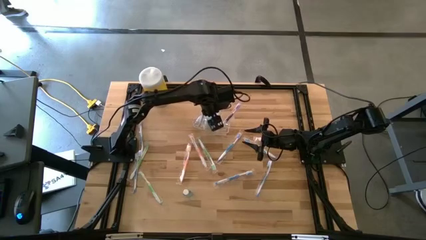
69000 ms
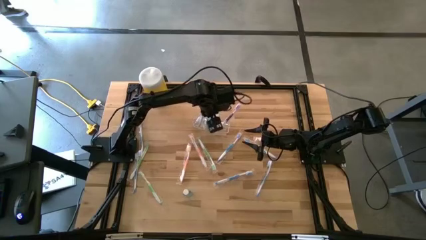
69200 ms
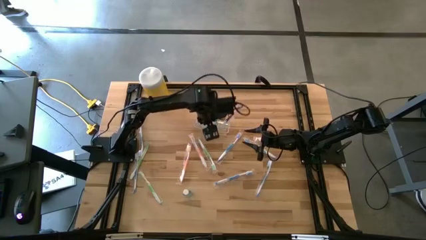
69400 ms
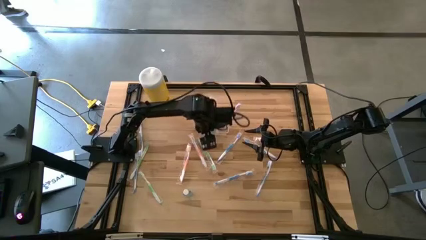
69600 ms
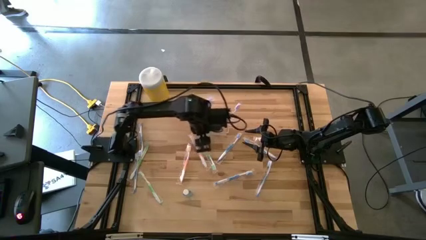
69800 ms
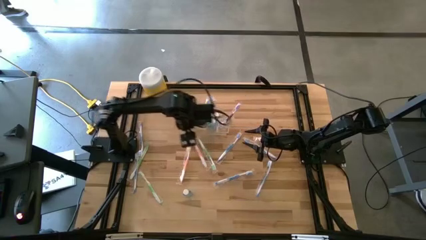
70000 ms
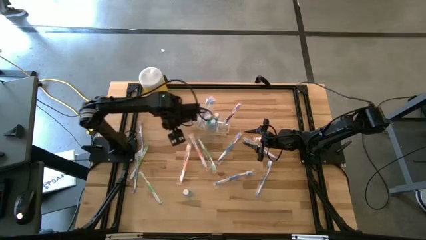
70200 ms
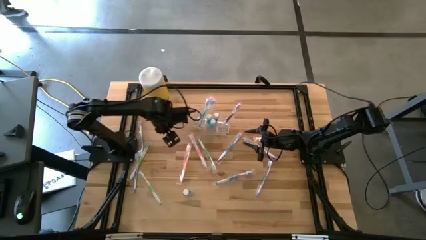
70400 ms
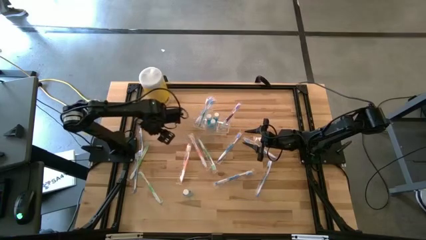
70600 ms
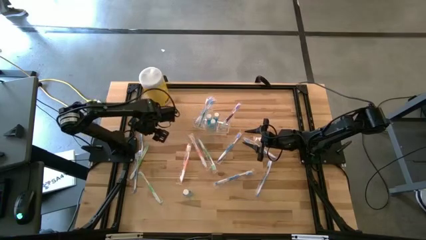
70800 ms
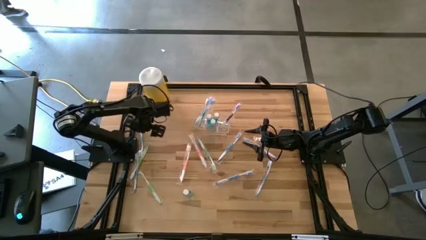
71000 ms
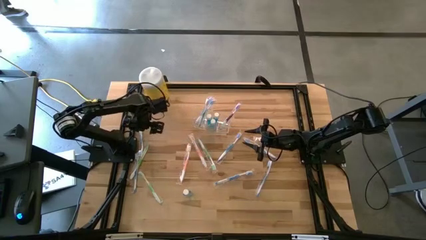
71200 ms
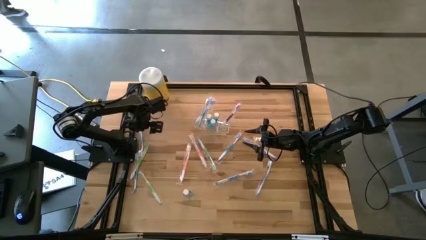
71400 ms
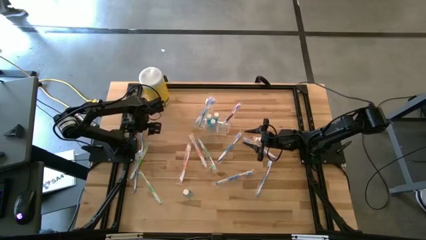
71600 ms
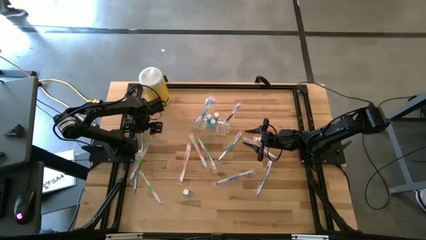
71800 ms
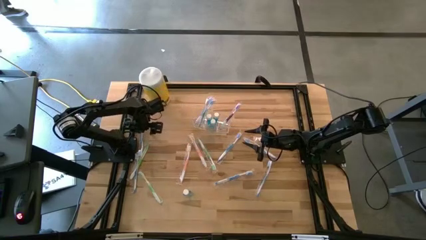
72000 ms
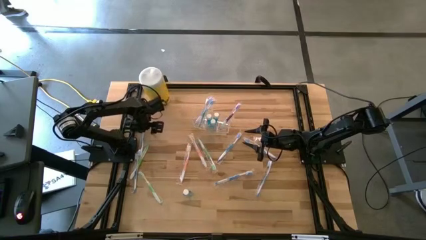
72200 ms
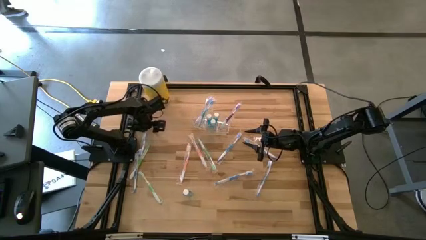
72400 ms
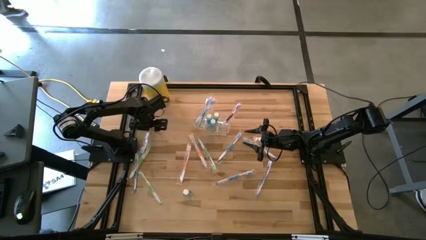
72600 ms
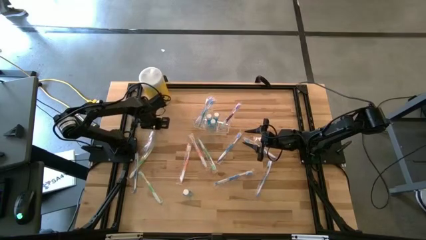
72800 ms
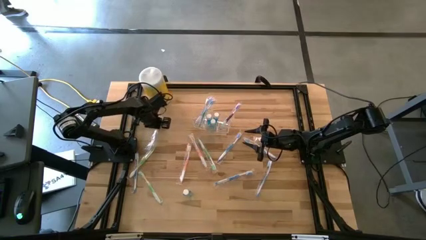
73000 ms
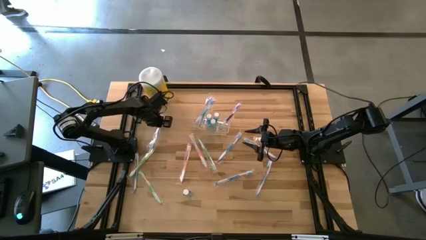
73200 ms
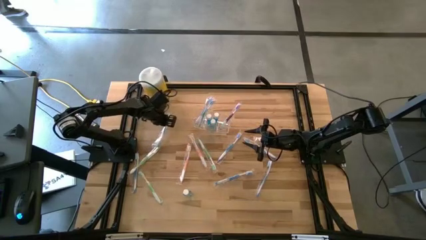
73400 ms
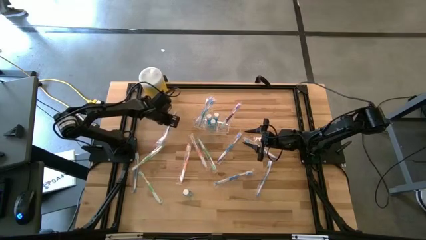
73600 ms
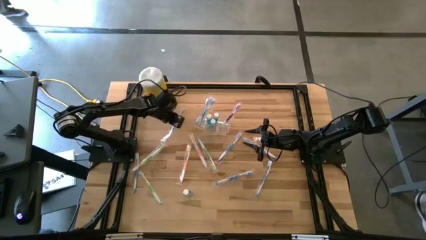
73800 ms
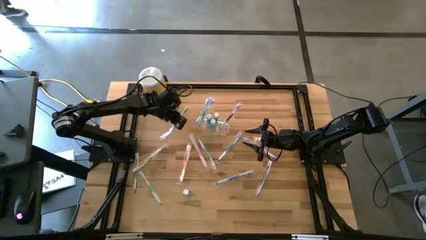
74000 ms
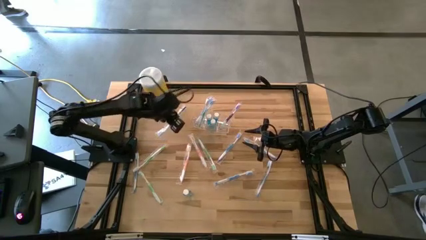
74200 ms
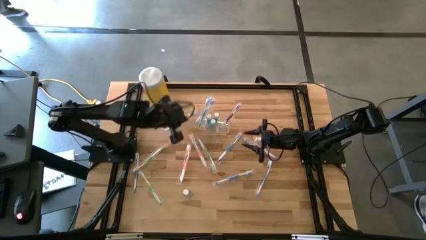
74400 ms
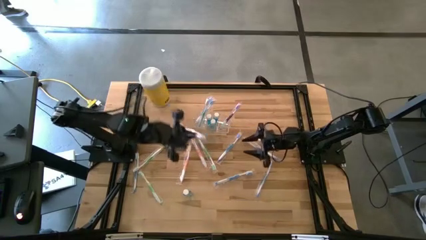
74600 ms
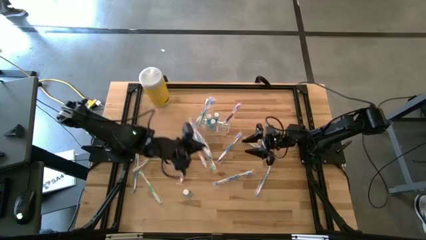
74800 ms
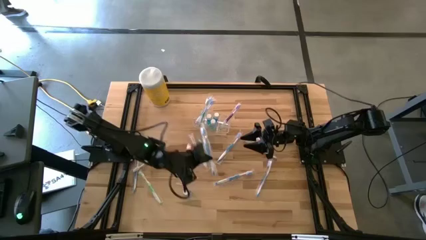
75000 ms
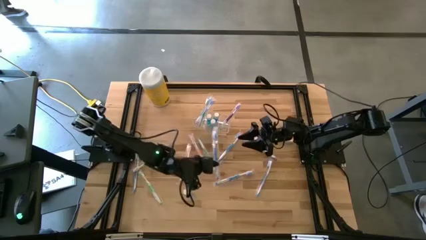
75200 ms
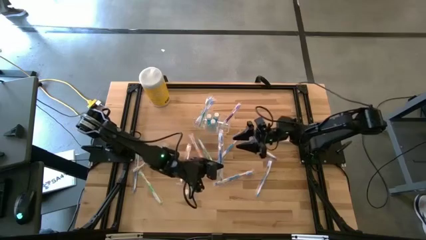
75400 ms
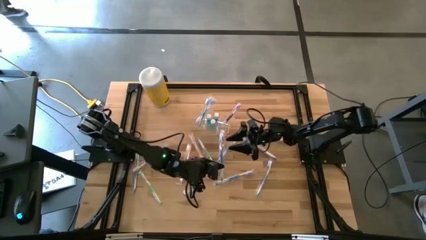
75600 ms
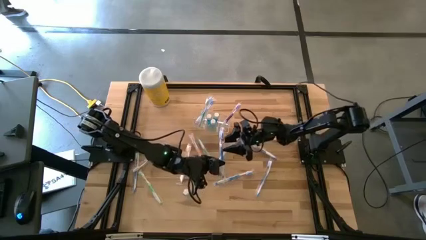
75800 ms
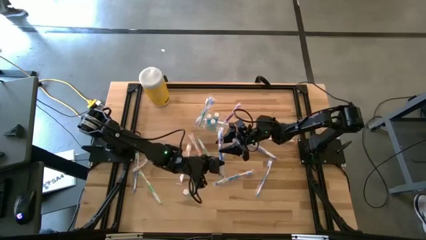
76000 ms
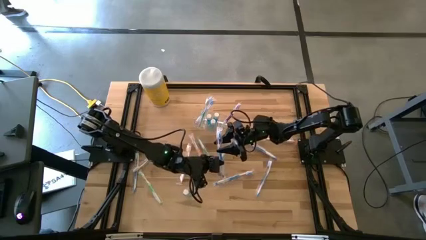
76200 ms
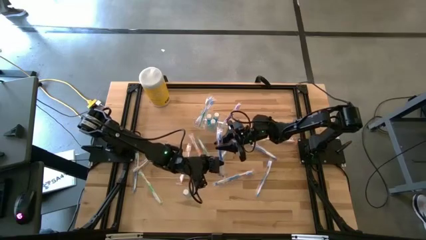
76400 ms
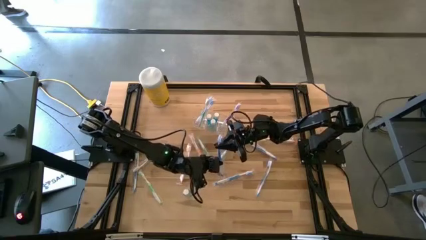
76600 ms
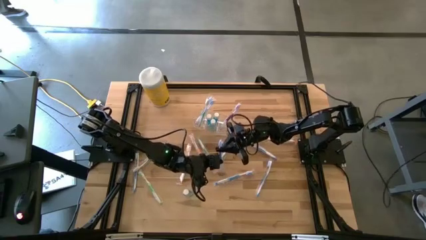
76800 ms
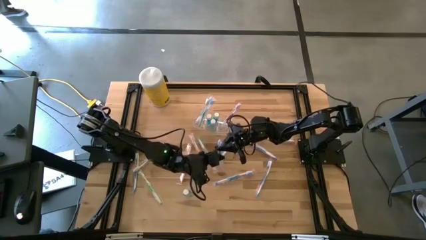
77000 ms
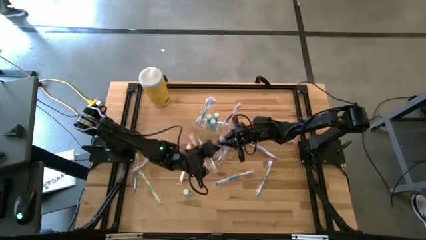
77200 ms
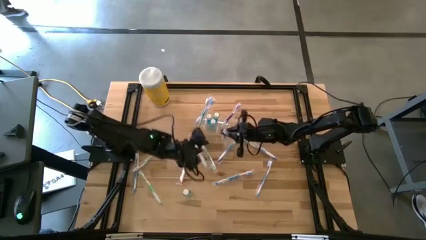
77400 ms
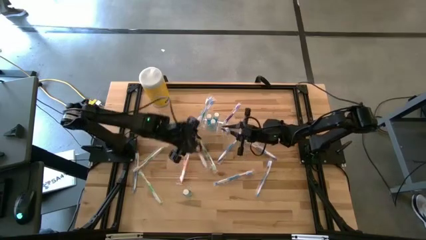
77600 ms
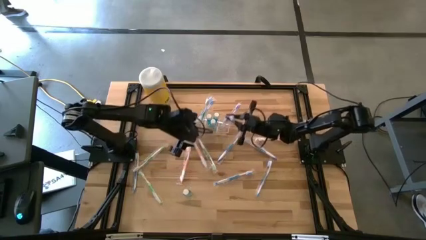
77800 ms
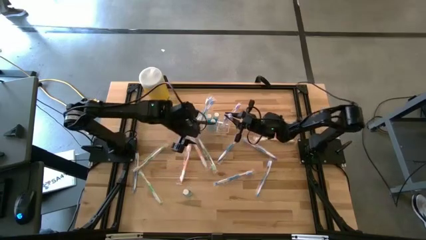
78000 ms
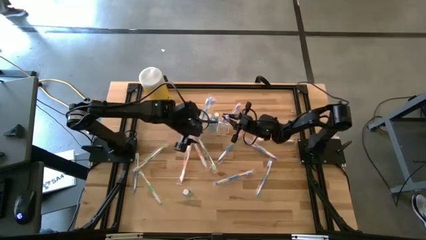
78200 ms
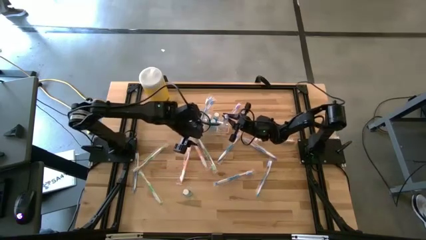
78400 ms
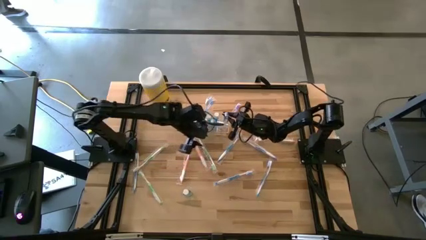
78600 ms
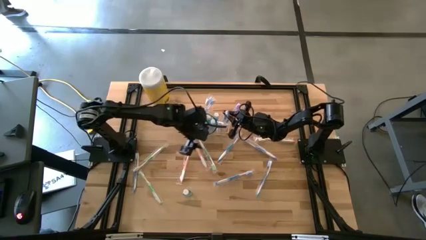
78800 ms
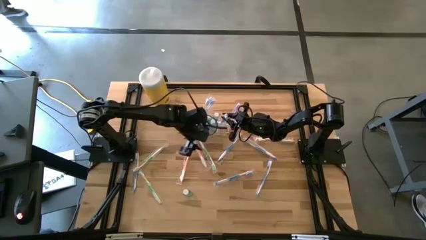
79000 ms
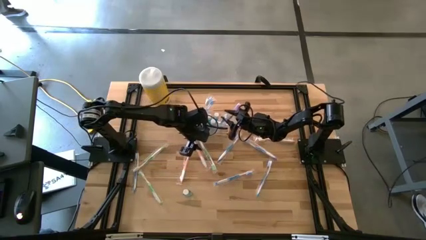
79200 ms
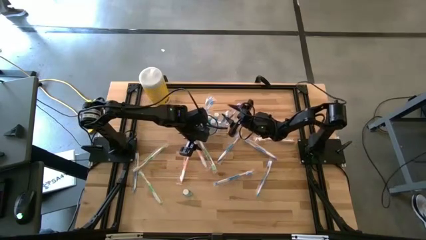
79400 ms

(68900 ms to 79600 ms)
Task: Pick & Place toothbrushing station
Put the blue toothbrush into the transparent organizer

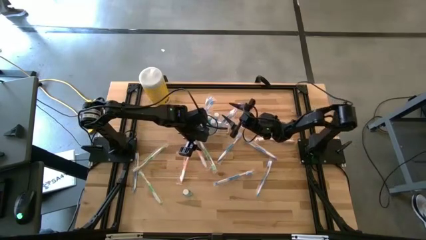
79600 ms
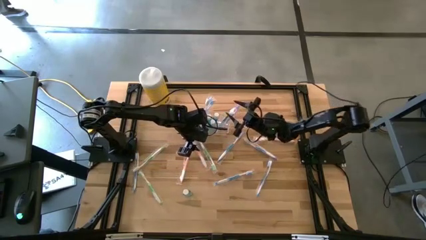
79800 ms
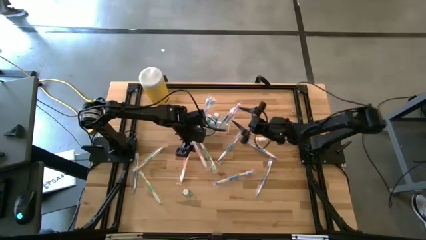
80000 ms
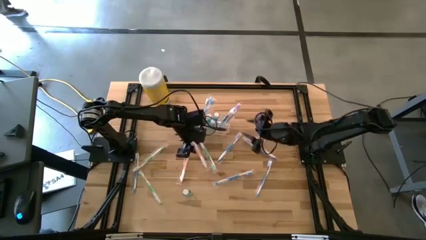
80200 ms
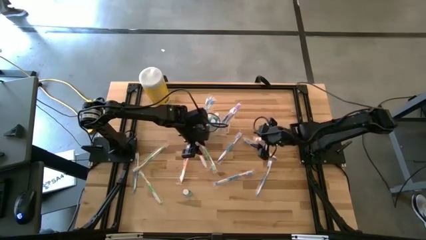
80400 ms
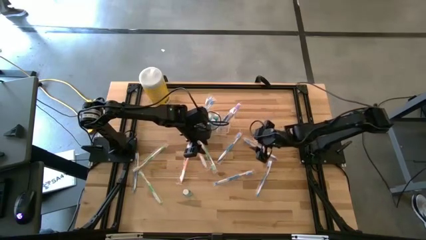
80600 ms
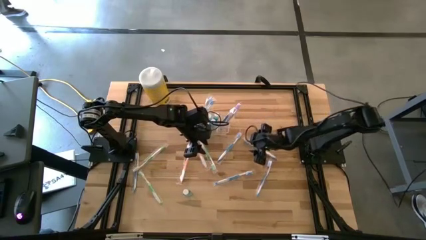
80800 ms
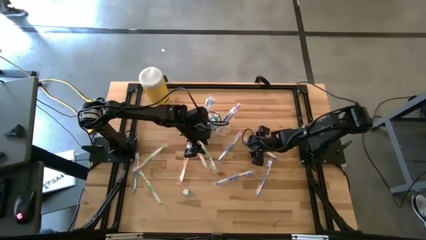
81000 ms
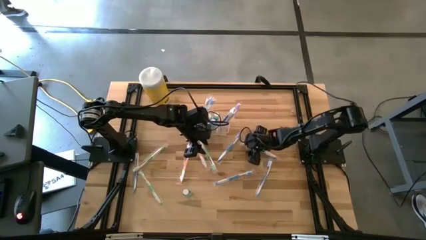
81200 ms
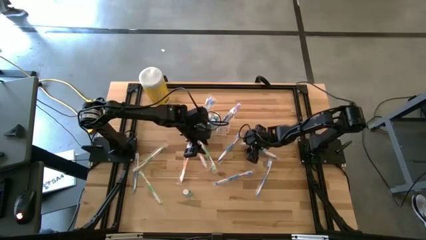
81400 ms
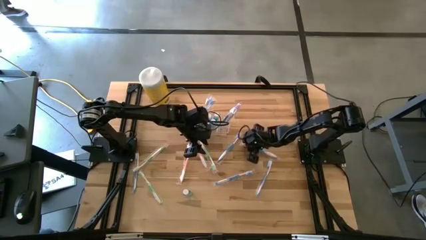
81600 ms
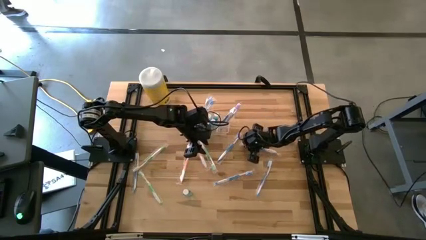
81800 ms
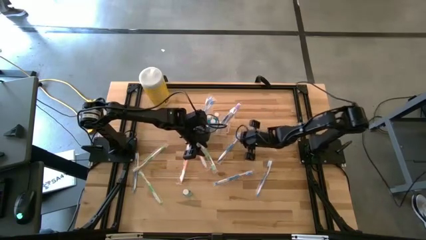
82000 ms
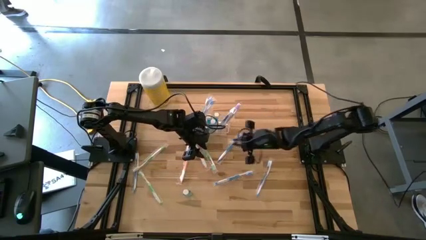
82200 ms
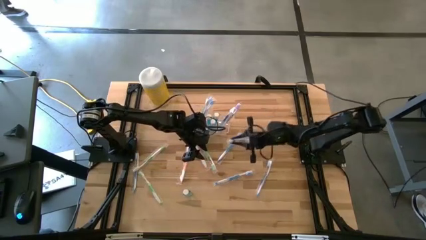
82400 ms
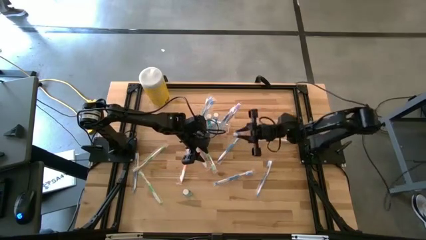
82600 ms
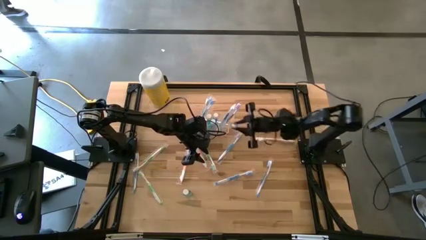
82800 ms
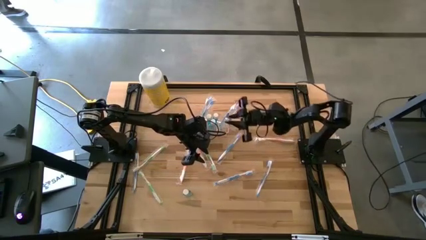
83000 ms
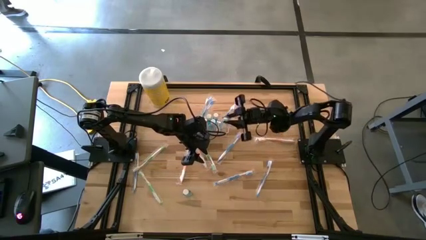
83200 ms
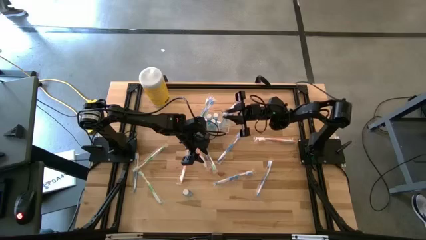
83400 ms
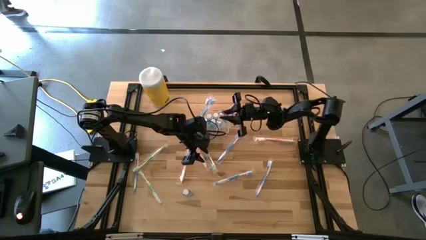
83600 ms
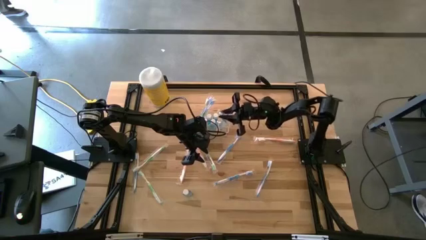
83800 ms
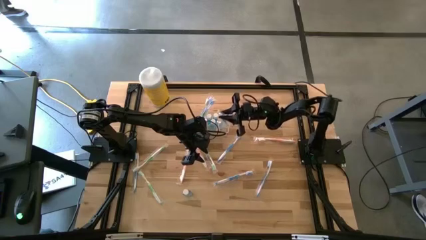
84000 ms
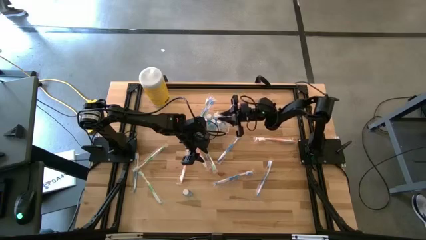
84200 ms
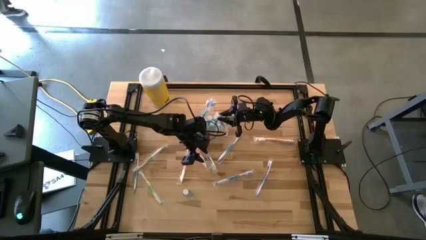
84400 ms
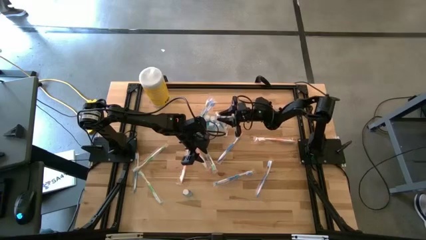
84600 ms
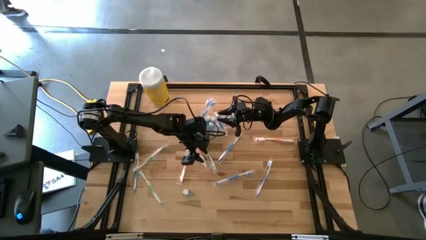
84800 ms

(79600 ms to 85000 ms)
Put the blue toothbrush into the transparent organizer

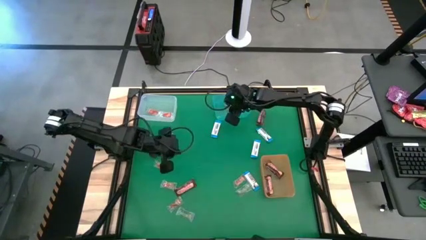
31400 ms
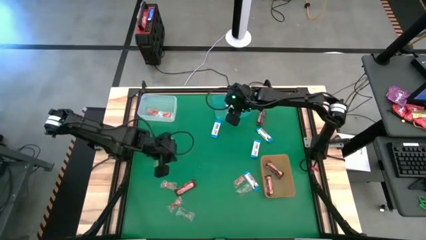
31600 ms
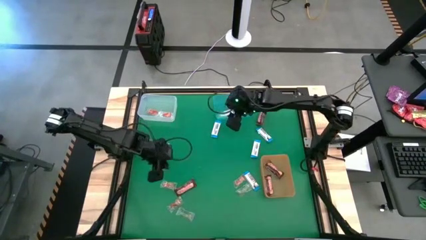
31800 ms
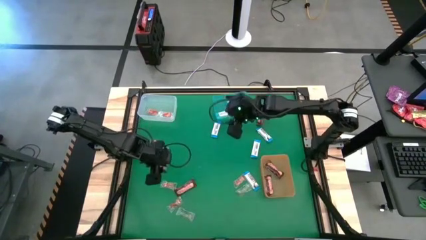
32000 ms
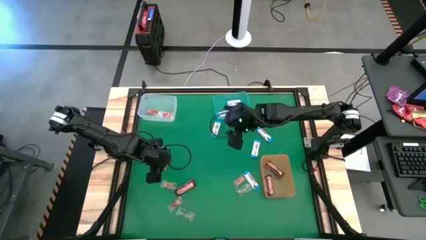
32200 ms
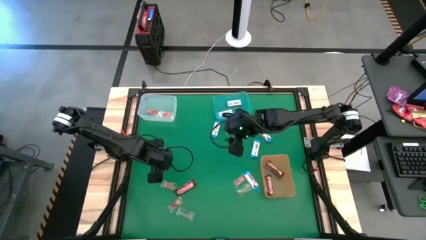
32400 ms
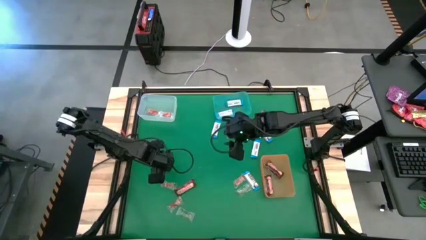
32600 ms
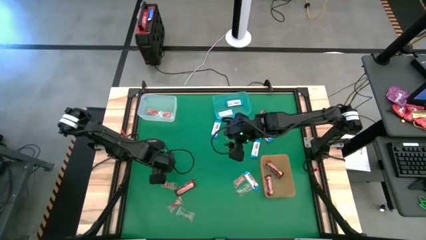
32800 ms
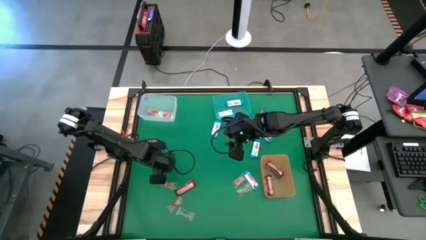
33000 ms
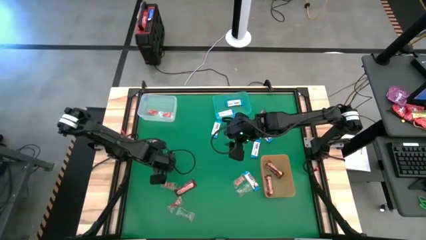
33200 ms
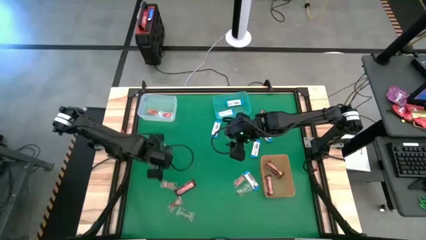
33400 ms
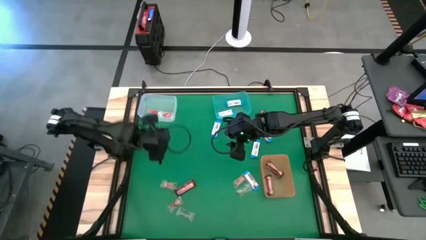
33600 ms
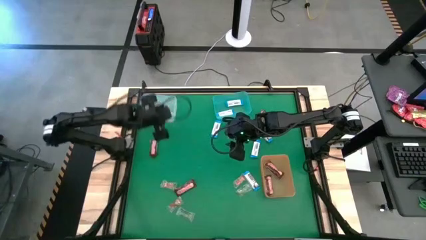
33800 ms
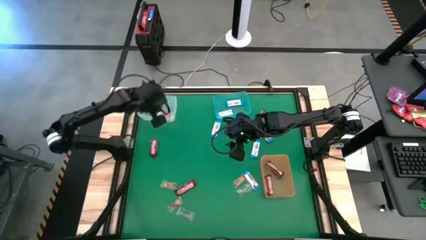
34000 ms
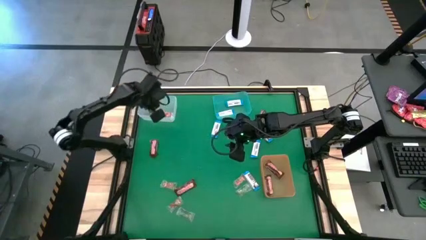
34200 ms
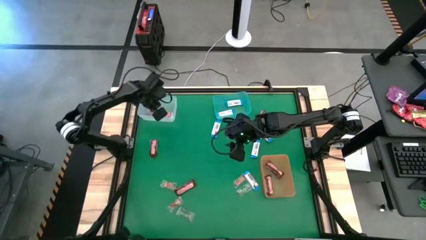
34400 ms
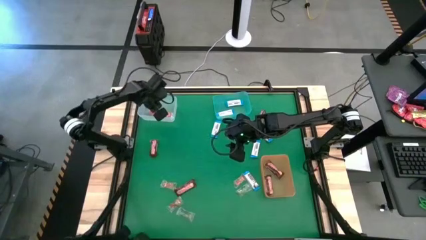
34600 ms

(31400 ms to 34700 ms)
Task: Sort candy by brand, put in halloween buckets
Put the orange gummy into the white bin
